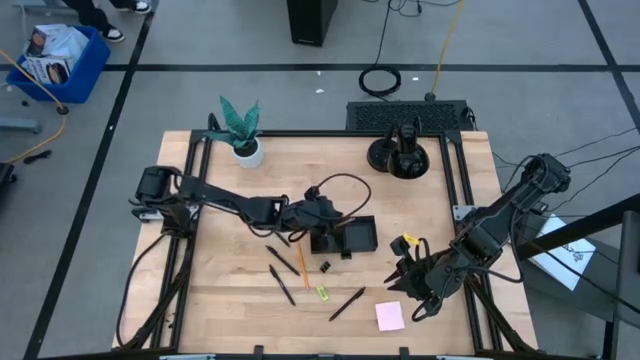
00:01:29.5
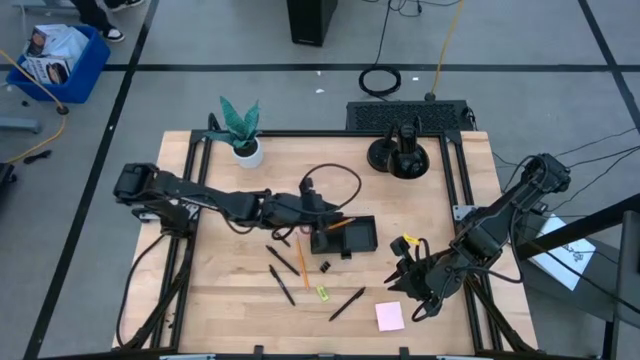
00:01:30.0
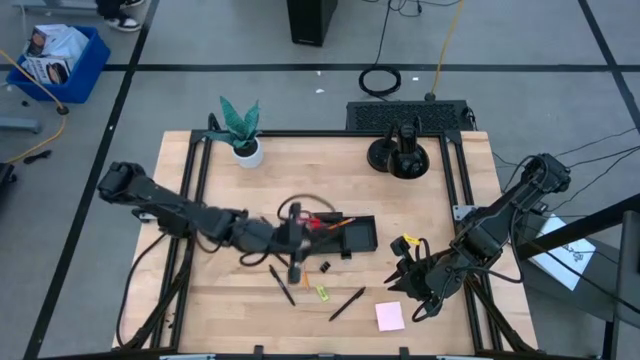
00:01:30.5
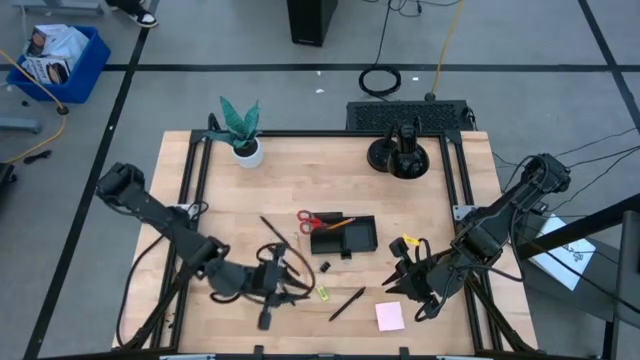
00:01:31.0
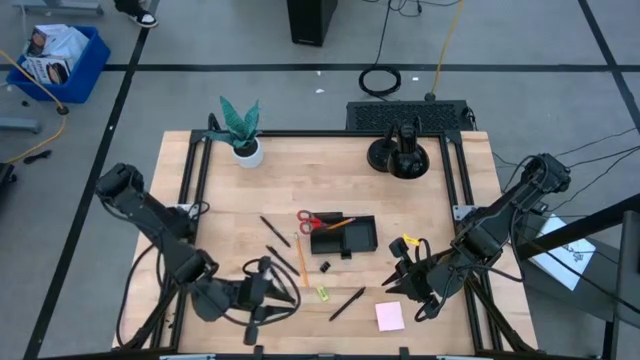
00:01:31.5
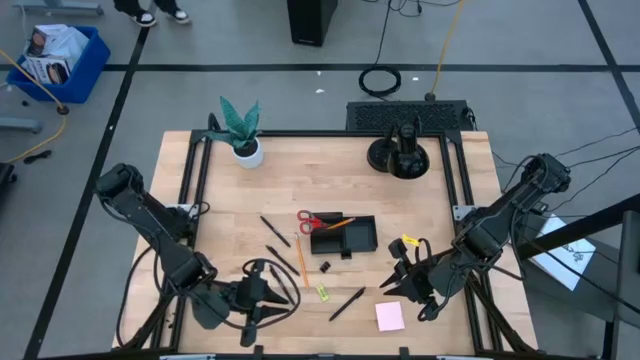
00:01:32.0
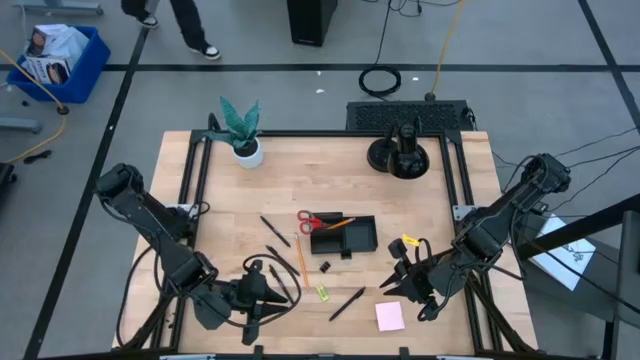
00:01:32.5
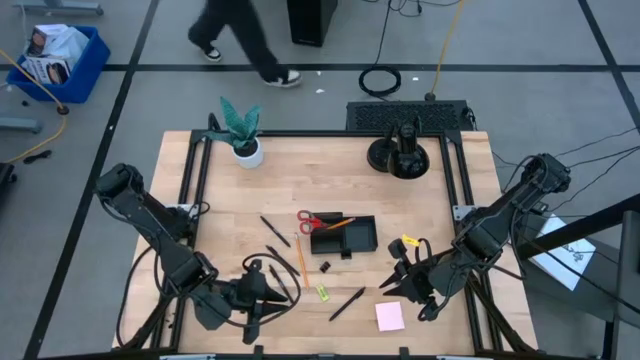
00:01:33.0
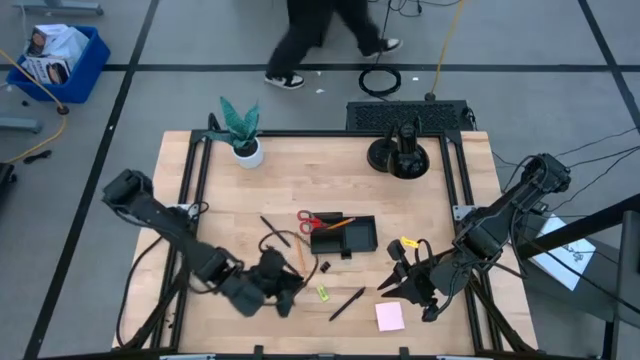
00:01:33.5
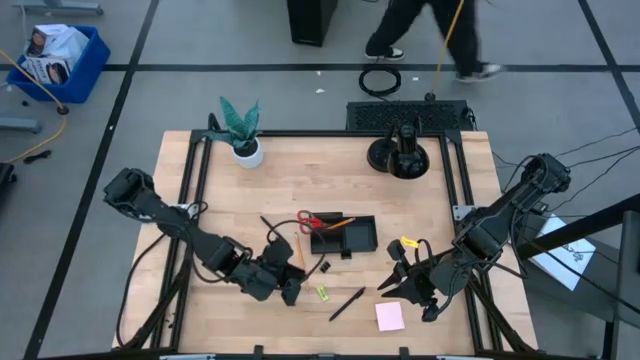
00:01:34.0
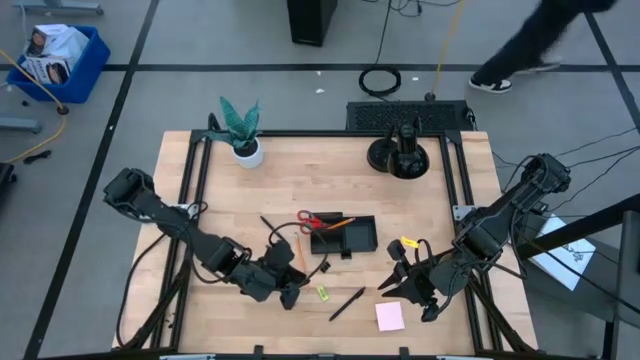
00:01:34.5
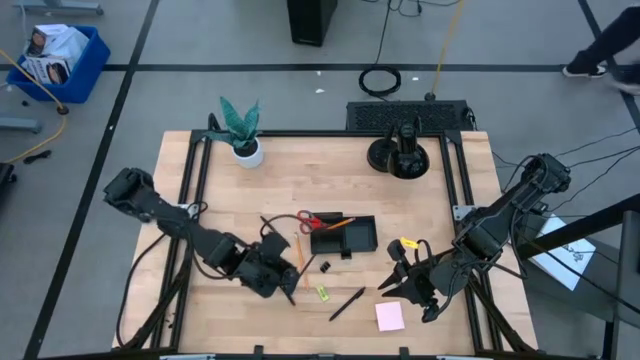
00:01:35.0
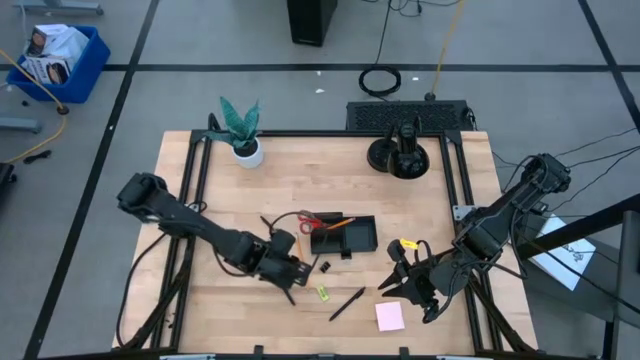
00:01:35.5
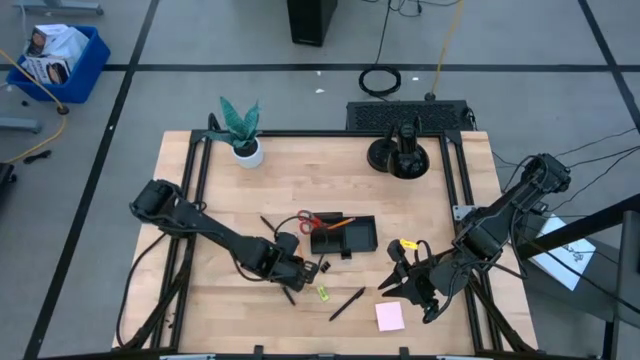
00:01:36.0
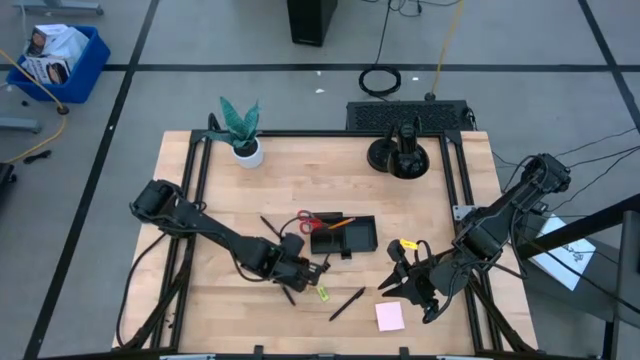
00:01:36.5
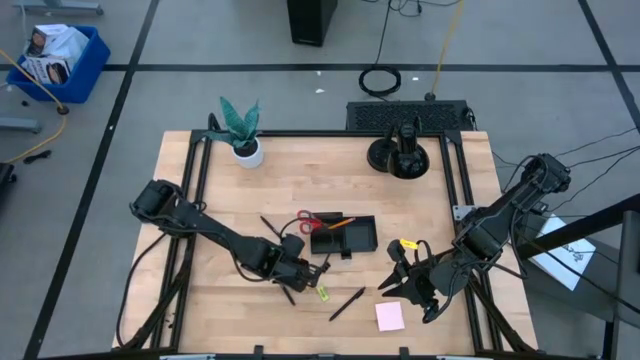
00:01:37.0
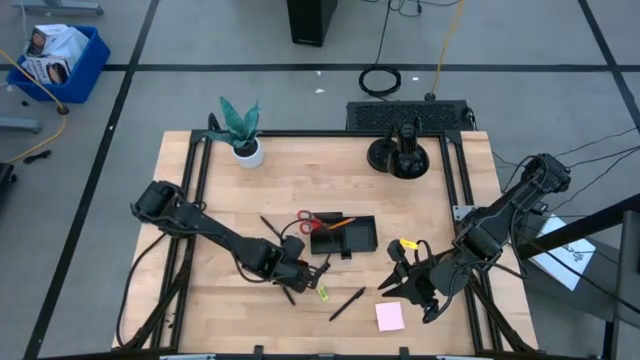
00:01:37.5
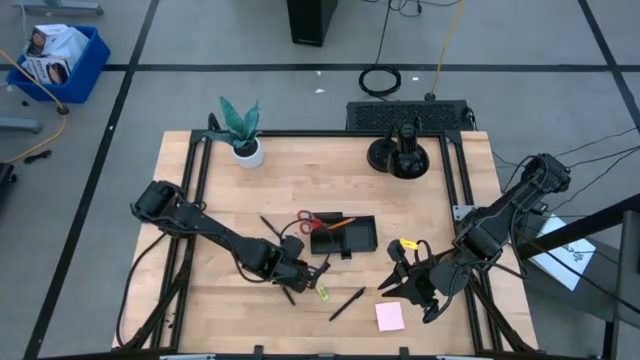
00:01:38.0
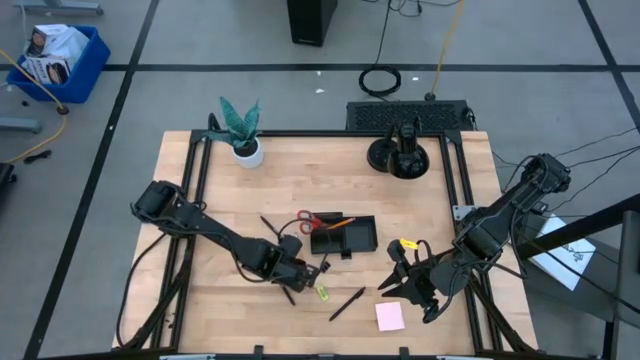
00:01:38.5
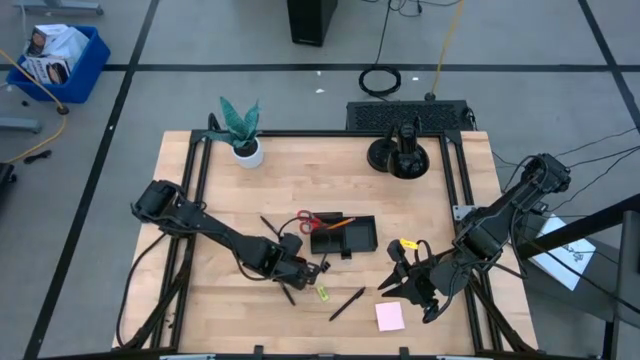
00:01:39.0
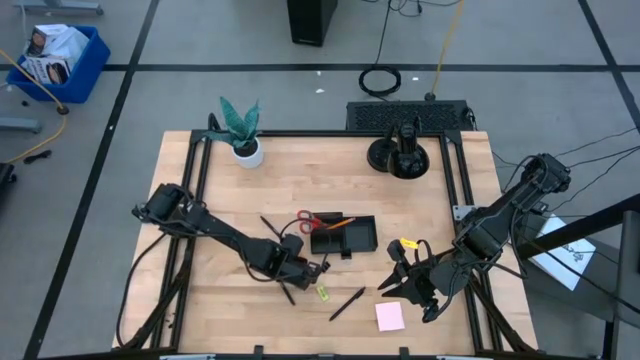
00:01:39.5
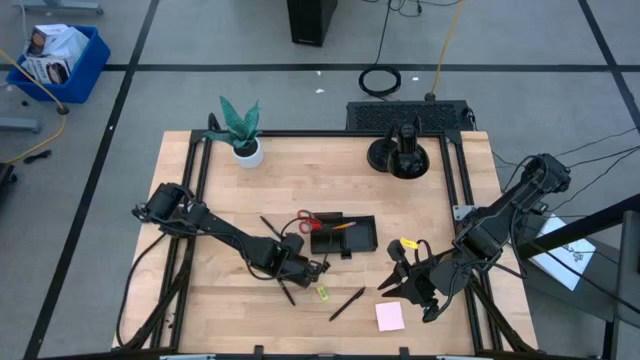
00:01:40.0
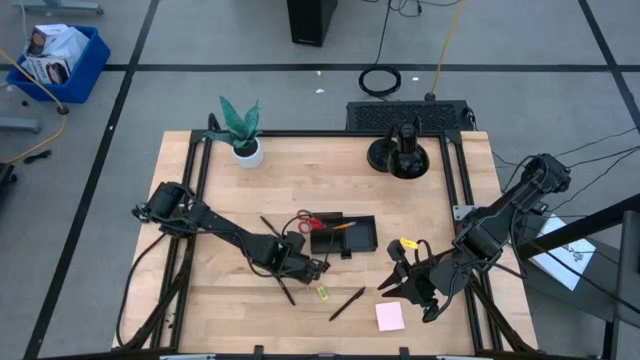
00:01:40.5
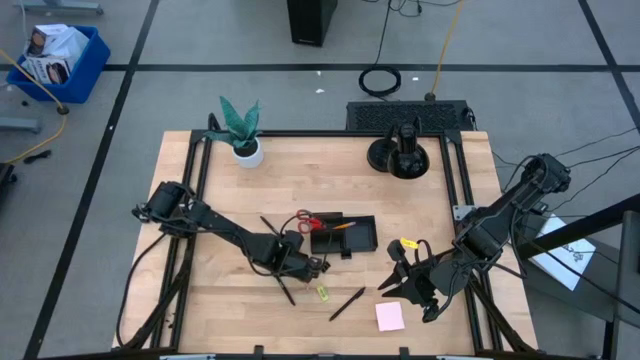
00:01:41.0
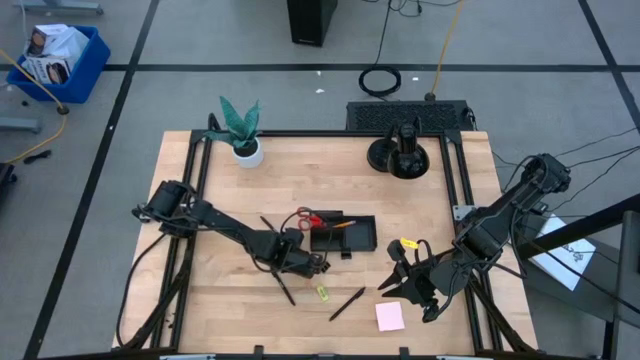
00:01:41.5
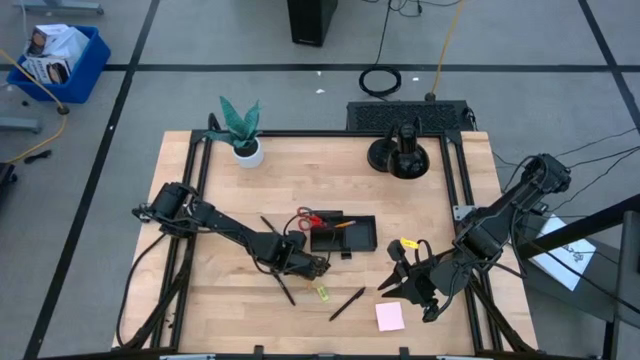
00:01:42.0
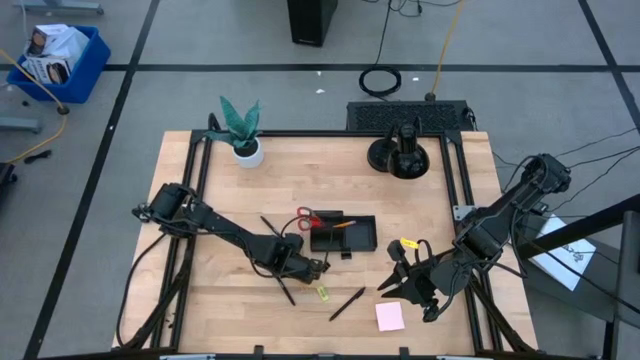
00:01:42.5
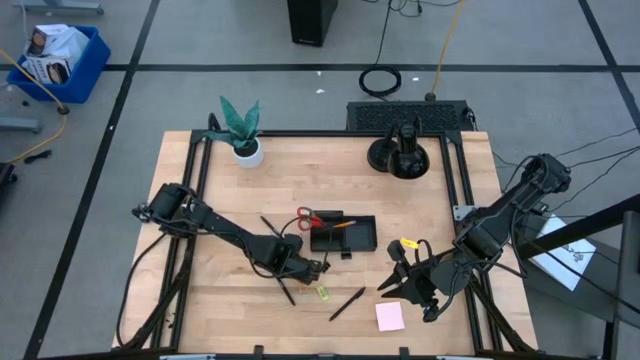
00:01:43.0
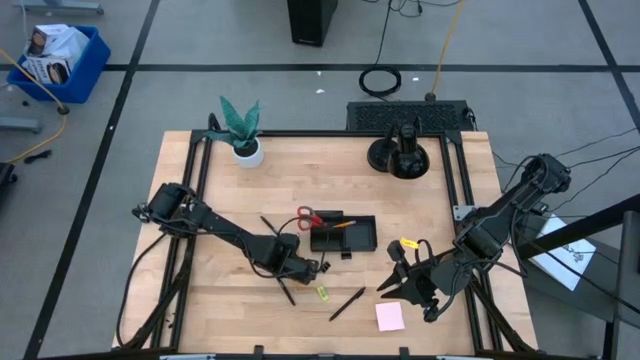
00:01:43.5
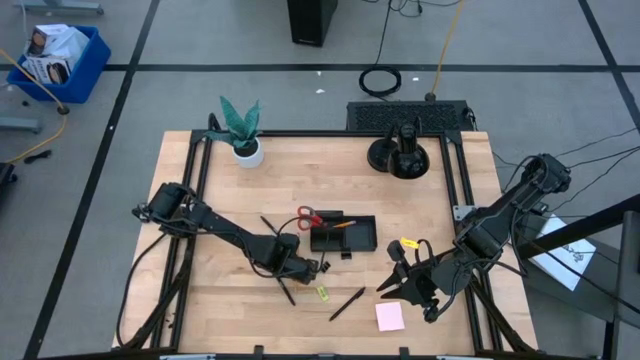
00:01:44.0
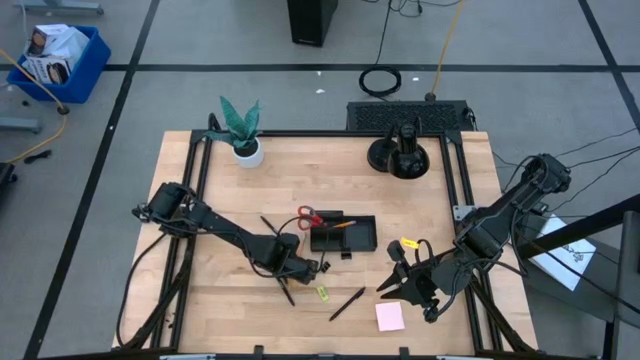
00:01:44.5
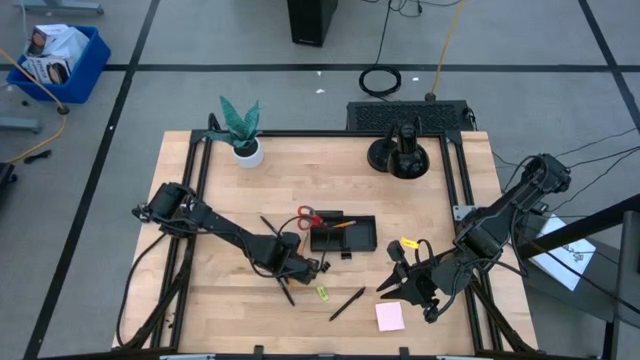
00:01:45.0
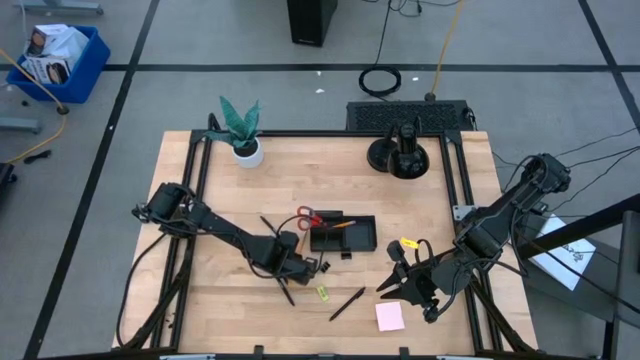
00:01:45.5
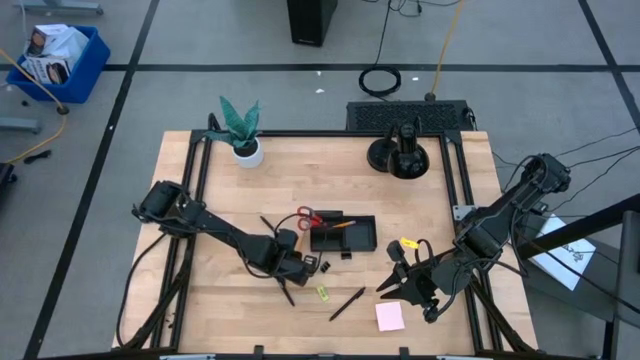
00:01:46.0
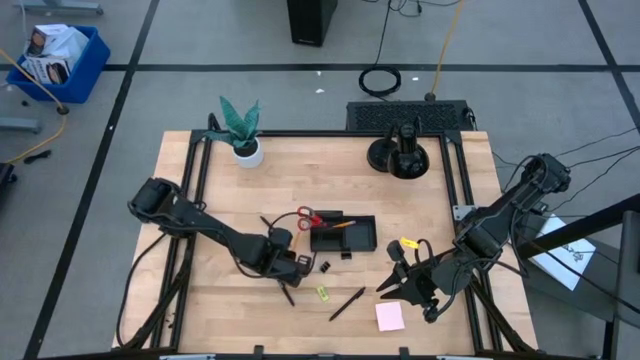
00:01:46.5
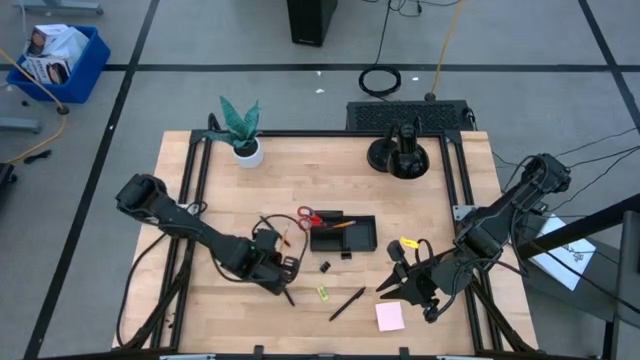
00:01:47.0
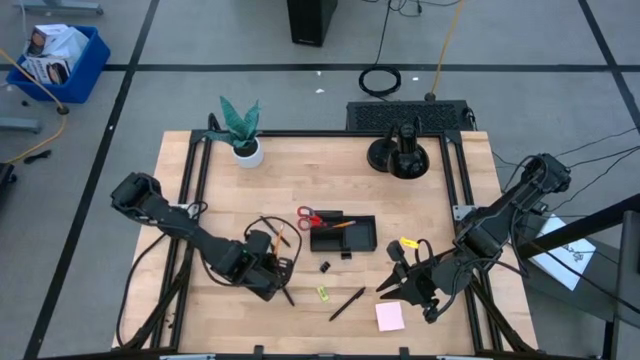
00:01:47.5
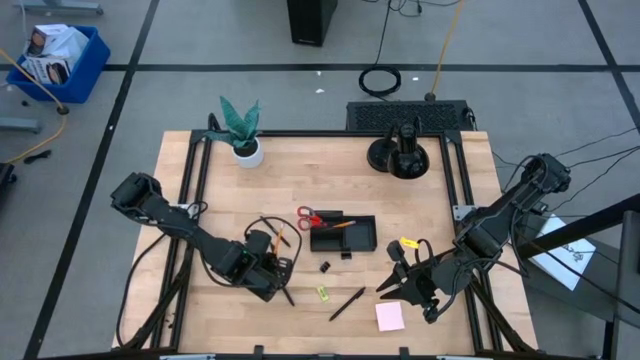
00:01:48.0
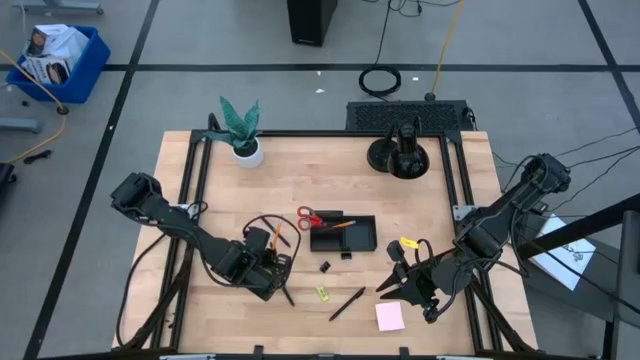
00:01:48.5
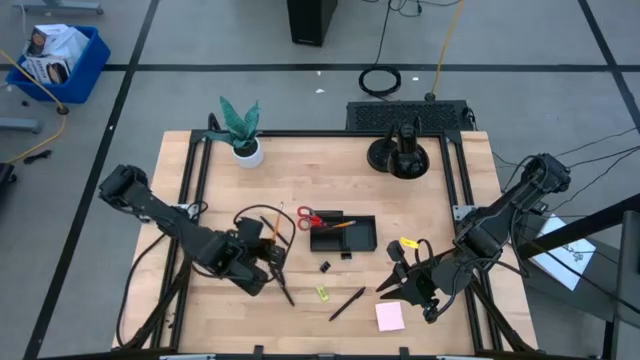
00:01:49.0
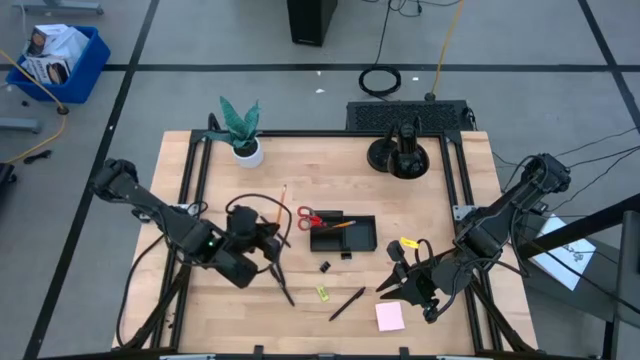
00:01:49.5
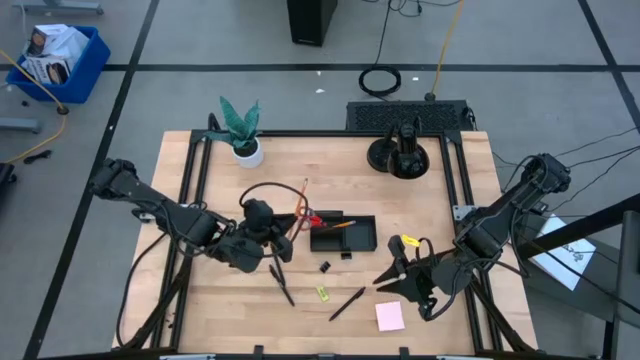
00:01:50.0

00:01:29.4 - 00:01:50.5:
Task: Pick and place office supplies into organizer
Put the yellow pencil into the black desk organizer

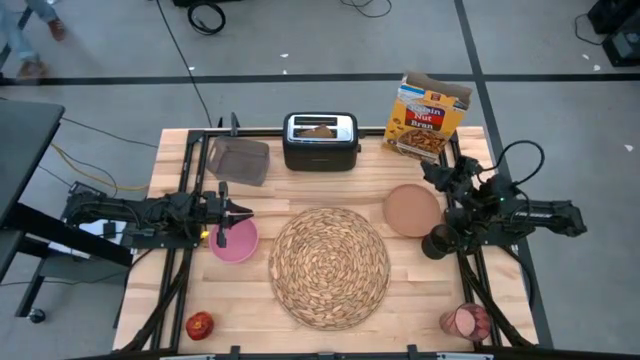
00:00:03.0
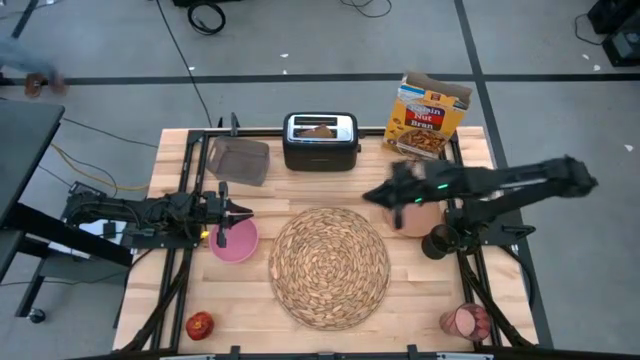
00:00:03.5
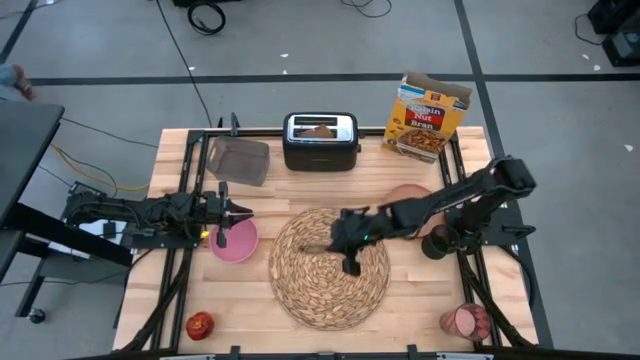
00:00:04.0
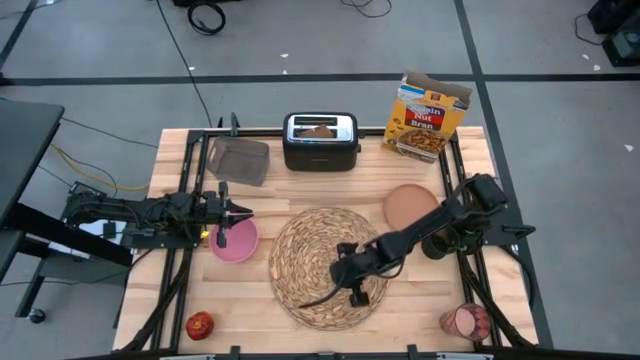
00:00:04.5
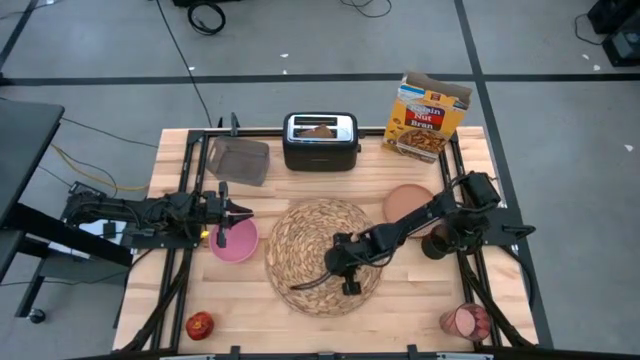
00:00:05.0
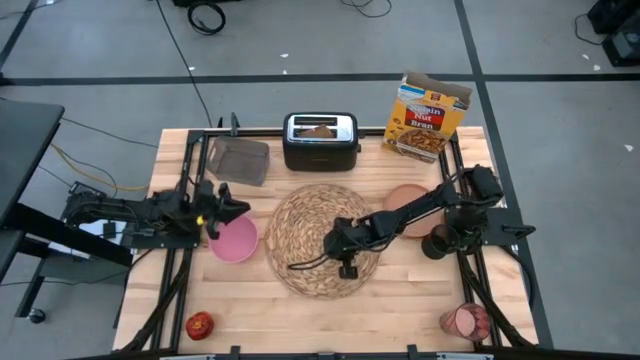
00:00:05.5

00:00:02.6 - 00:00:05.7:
Task: Arrange a breakfast setting
Adjust the brown placemat
